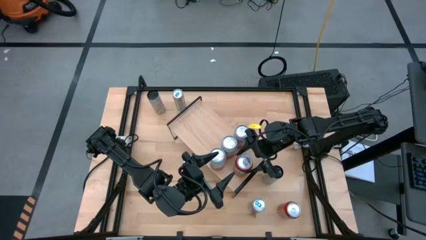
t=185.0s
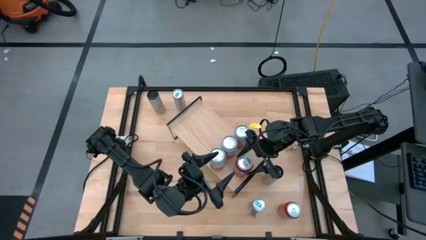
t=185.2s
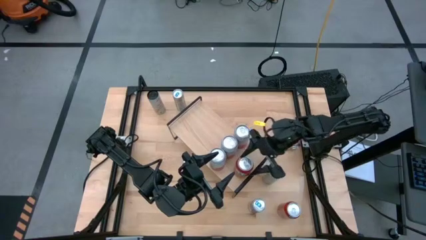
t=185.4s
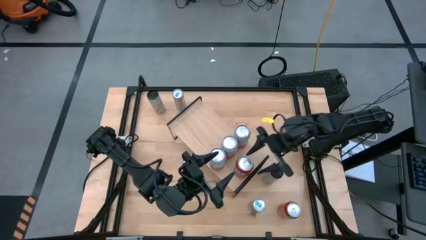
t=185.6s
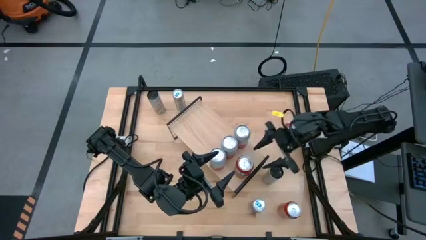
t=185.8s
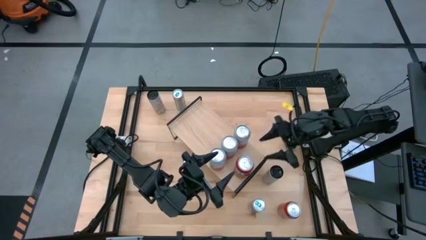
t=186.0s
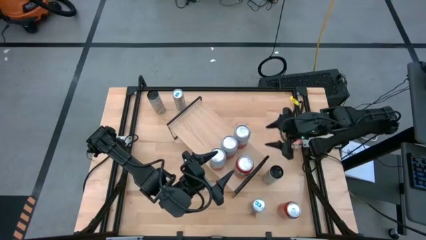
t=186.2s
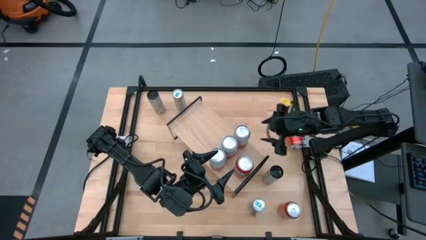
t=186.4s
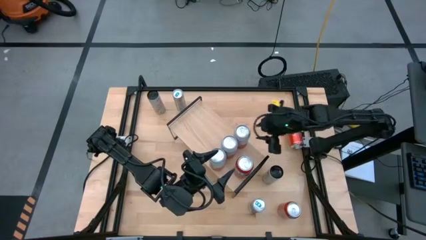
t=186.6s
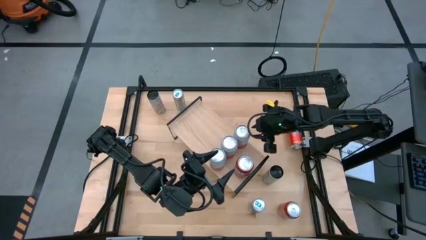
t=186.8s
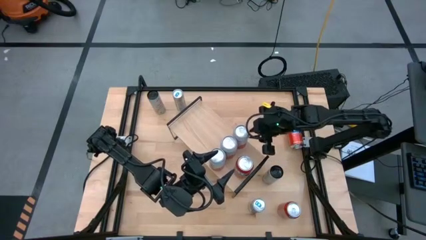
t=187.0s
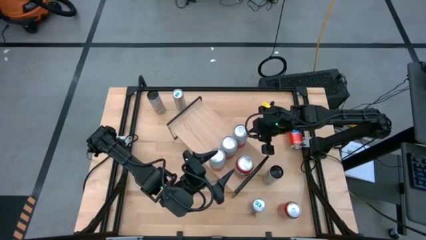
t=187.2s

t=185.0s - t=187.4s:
Task: Place canned beverage on shelf
Adjust the pink white soda can on the shelf

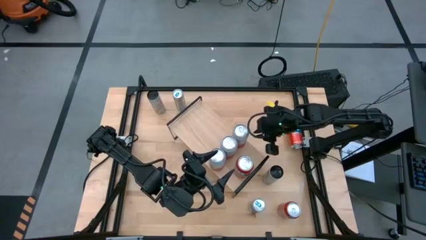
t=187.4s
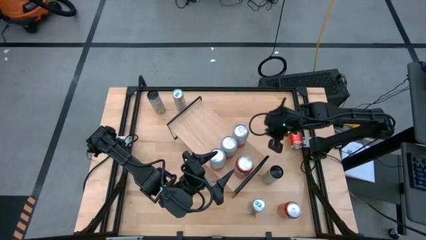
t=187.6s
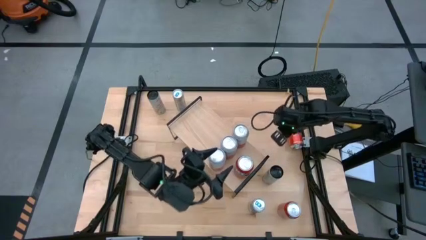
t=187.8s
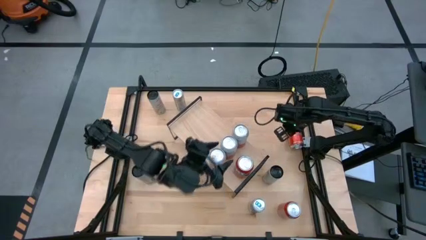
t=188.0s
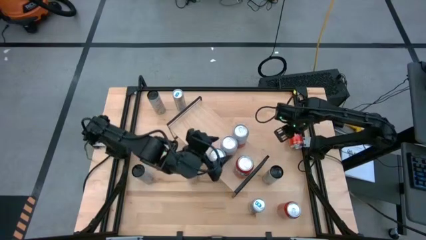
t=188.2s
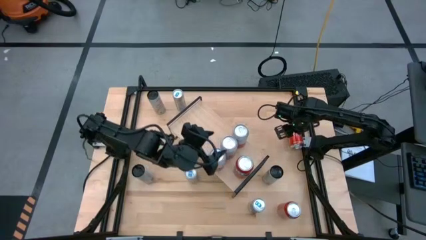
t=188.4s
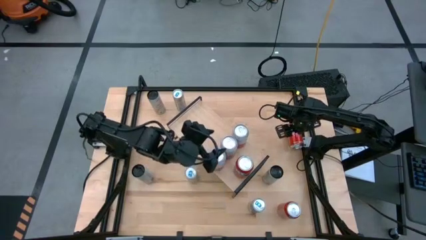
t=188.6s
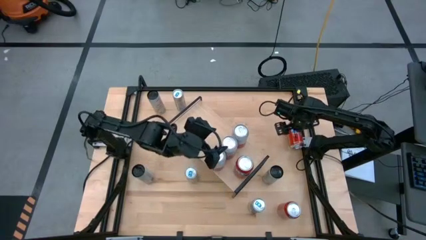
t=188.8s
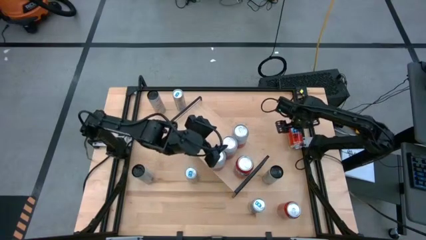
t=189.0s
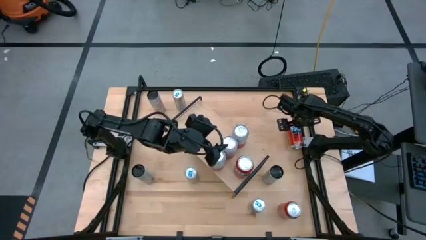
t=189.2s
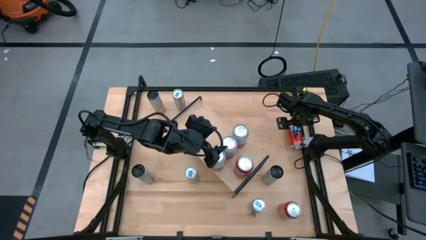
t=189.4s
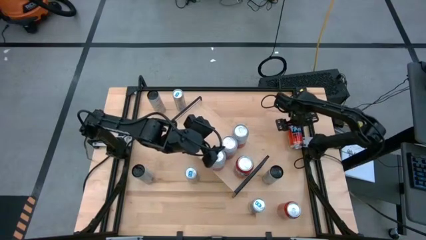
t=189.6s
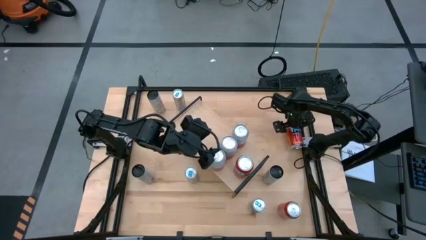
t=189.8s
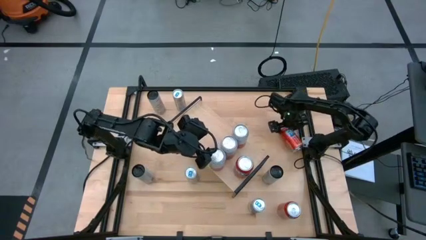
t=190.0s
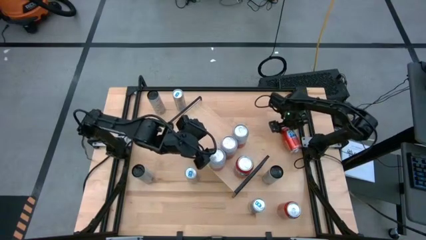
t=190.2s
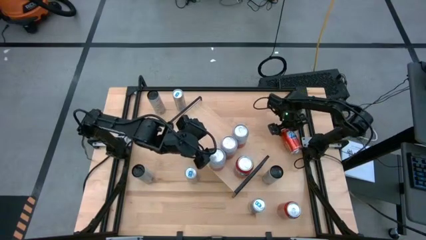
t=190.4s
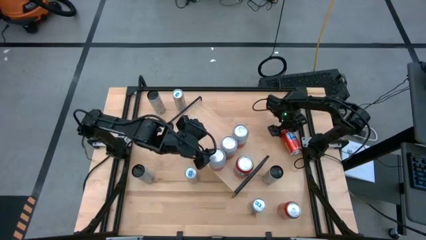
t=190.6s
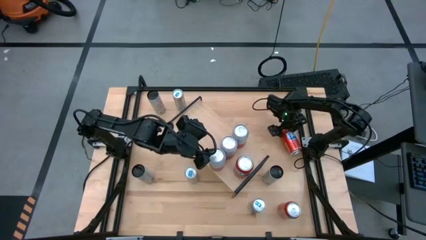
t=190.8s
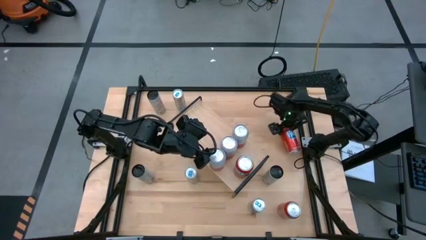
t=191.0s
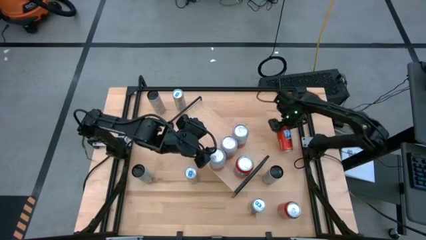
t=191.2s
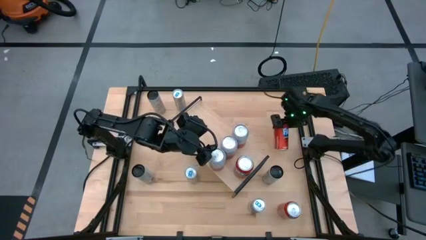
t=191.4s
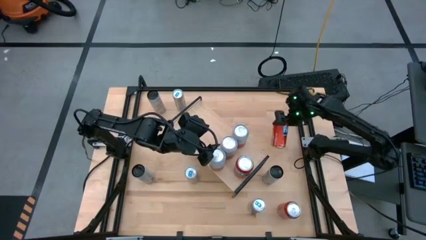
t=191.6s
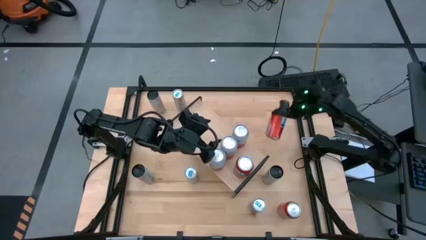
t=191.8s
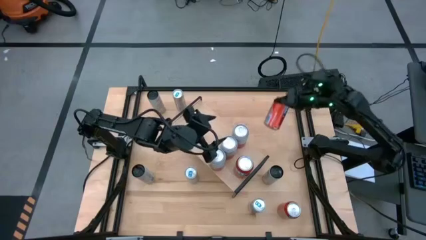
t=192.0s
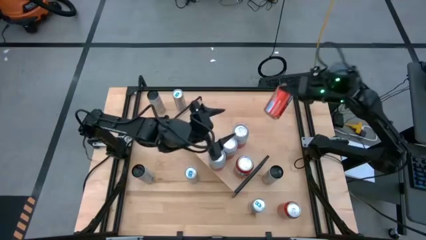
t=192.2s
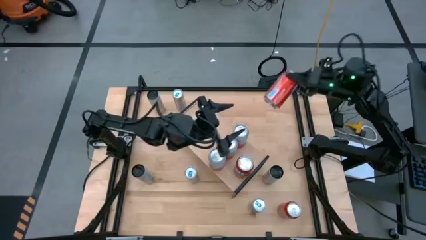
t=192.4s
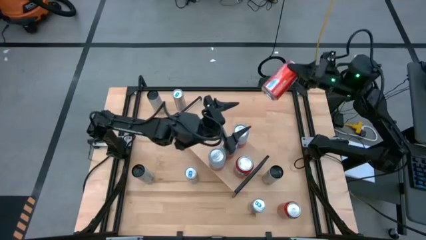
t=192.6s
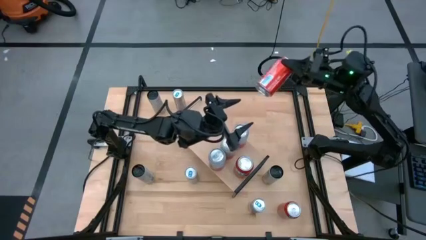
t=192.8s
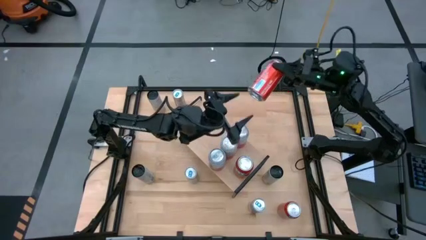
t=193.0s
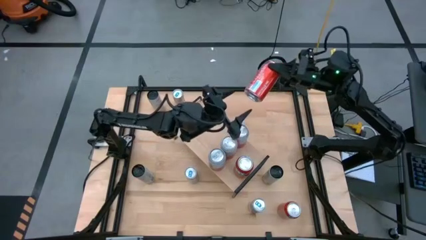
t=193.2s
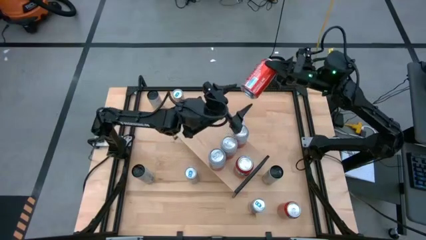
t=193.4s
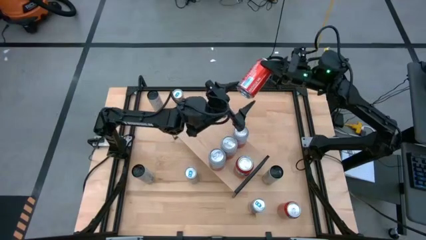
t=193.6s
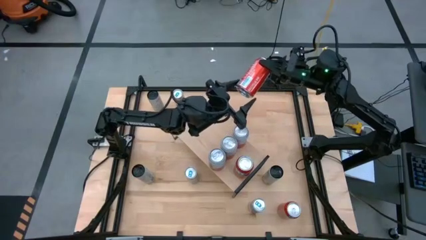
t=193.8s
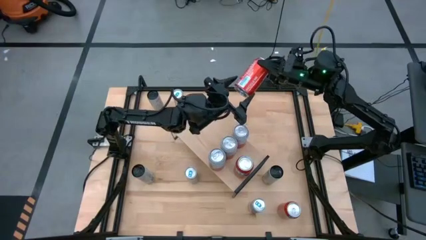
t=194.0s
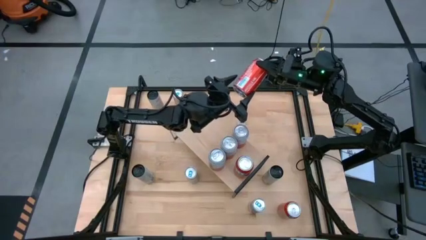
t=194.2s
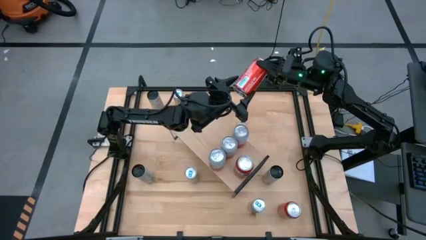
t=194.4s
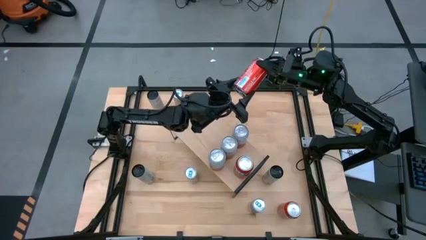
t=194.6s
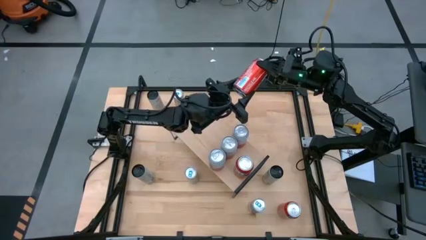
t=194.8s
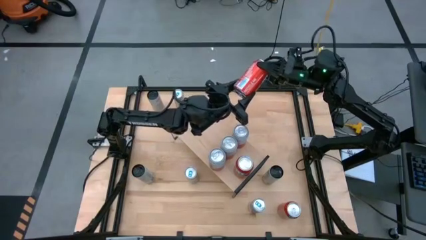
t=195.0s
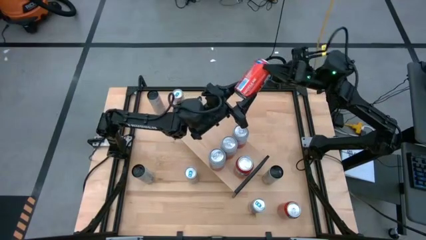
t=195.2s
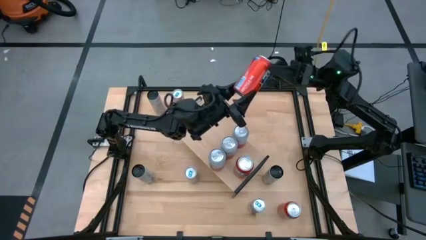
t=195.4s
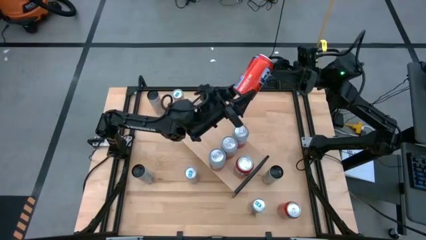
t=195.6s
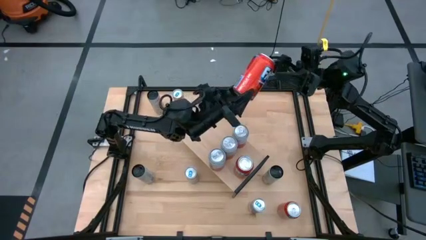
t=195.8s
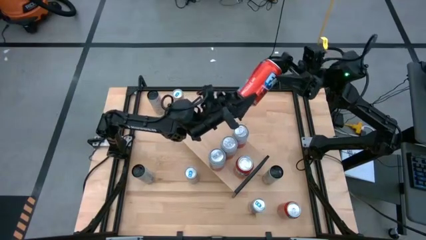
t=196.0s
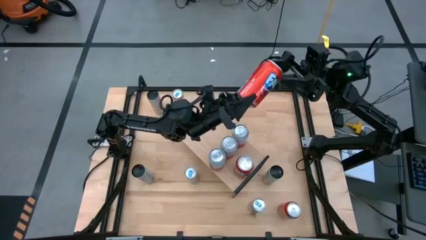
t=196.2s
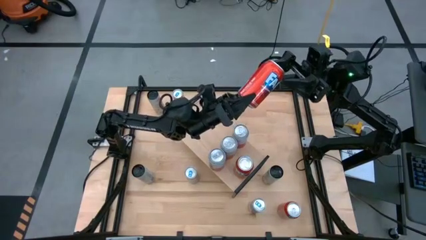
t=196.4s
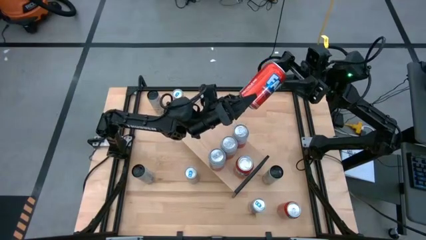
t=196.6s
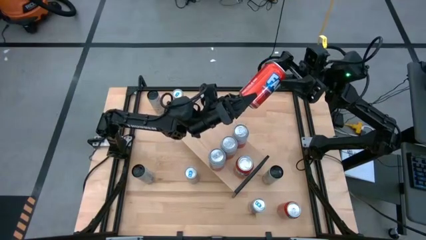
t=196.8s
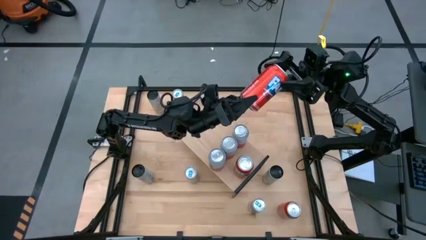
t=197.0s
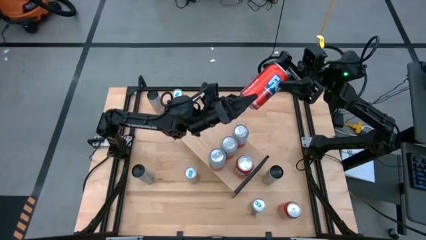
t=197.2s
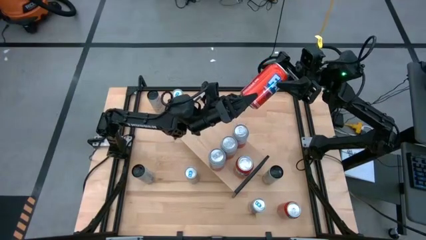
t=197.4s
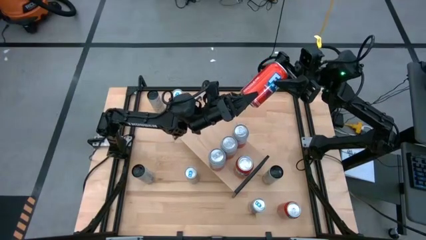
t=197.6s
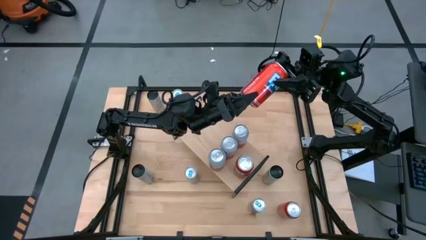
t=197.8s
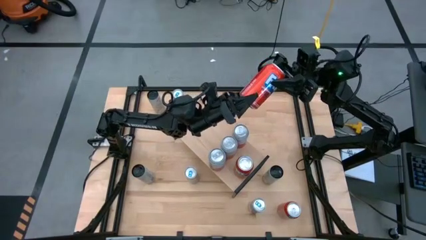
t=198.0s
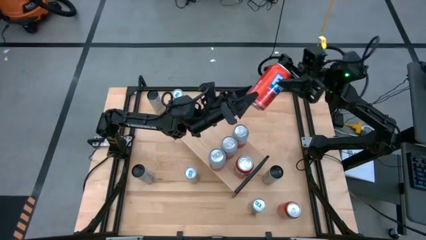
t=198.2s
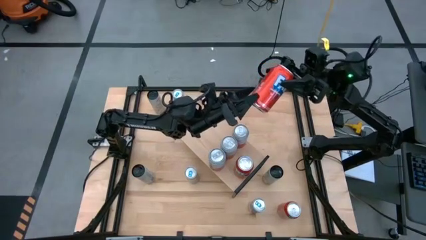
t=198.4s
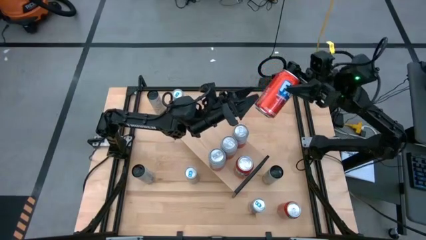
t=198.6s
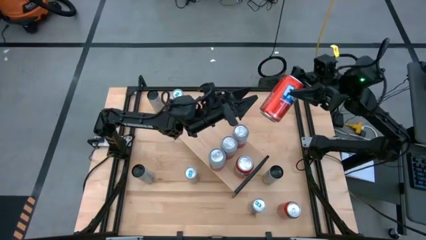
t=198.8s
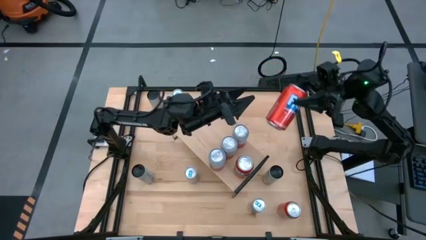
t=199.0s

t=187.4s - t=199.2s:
Put the top red soda can on the shelf aligned with the other red soda can

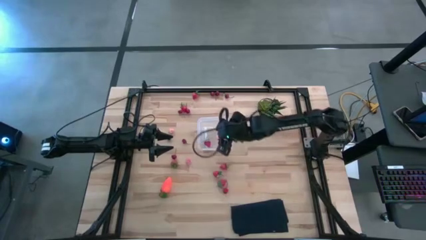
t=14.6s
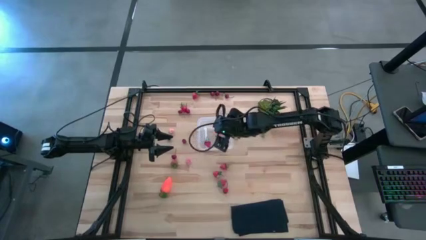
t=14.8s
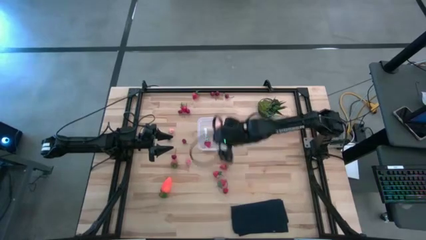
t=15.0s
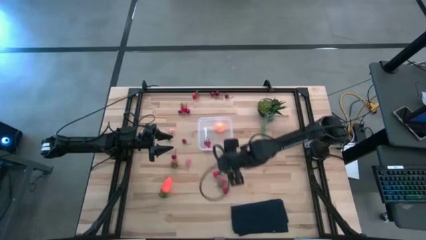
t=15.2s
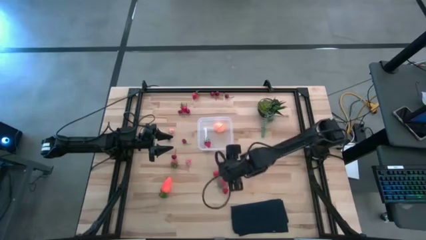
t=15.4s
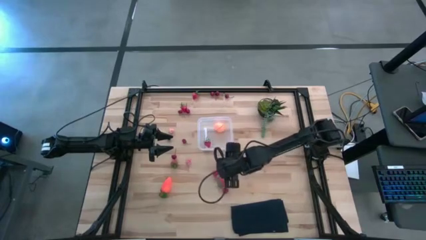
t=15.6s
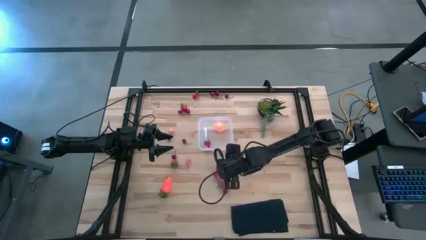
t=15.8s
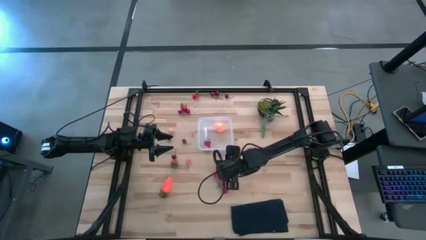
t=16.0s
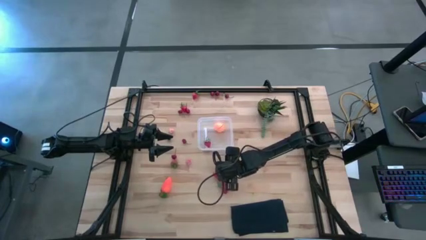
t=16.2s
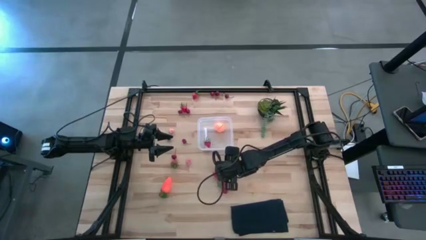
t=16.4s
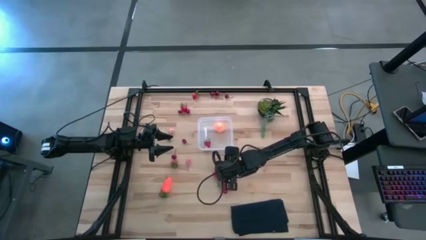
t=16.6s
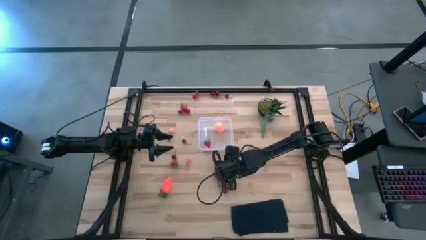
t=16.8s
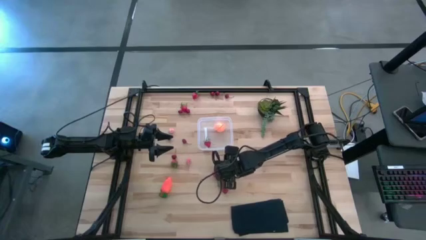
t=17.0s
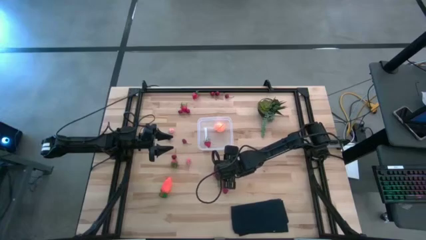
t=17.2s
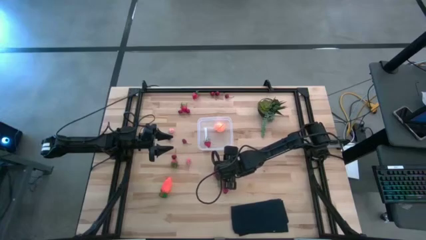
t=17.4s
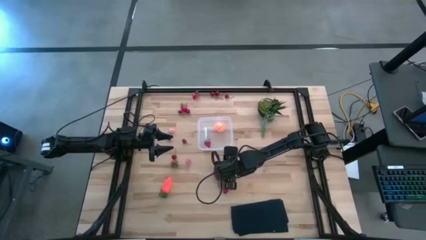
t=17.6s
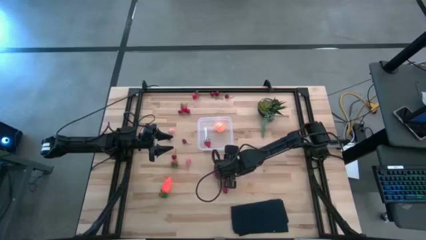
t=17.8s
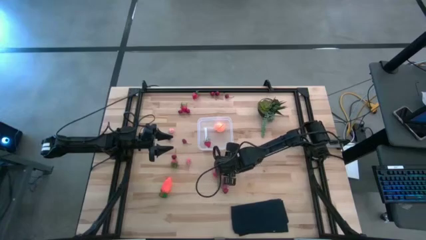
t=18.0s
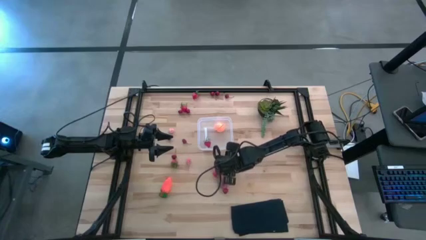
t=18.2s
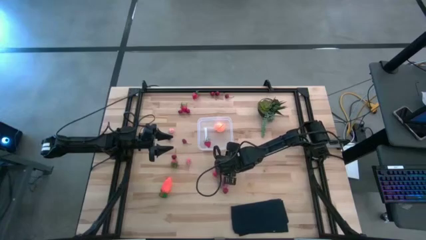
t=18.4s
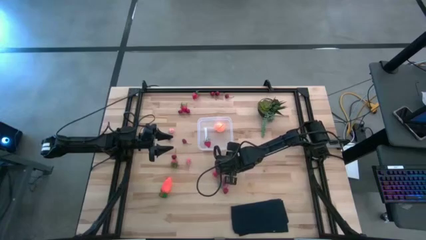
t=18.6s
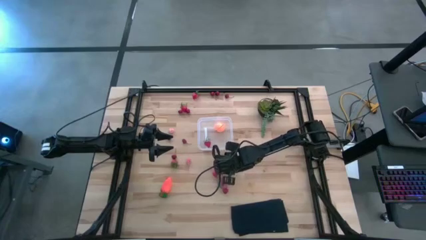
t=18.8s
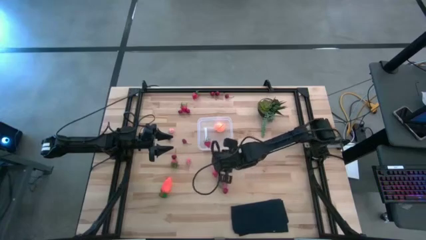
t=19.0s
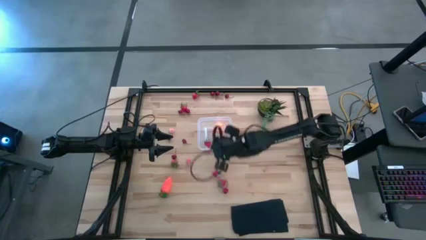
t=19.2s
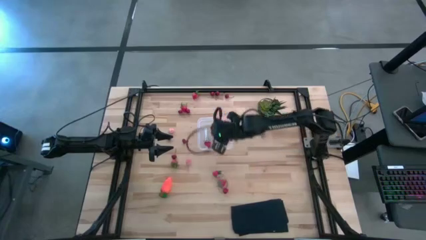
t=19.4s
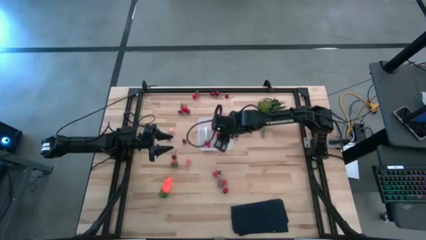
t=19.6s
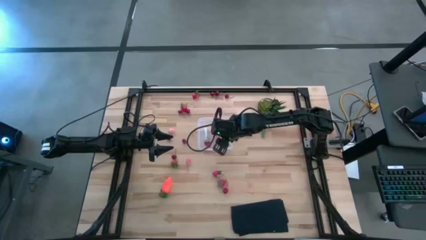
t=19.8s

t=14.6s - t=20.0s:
Task: Pick and placing Produce into tupperware
Put the strawberry into the transparent bin
